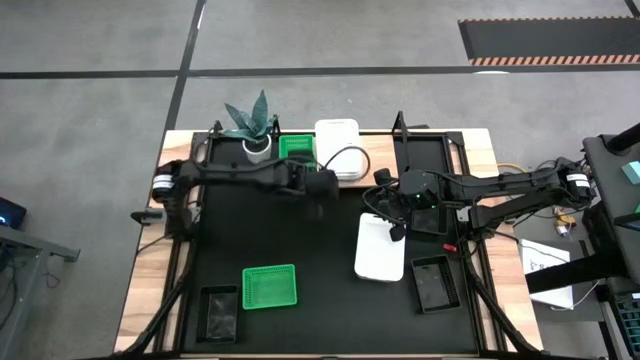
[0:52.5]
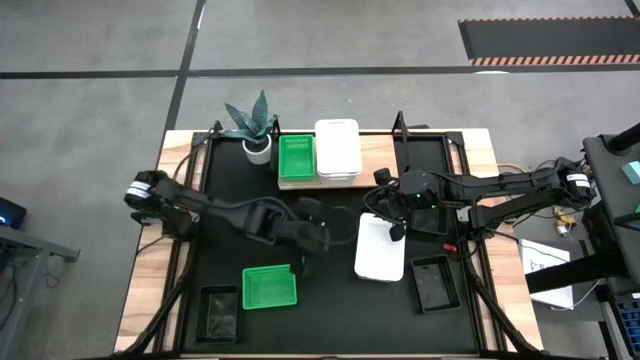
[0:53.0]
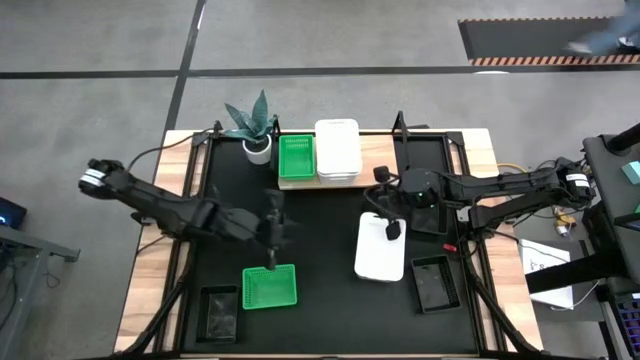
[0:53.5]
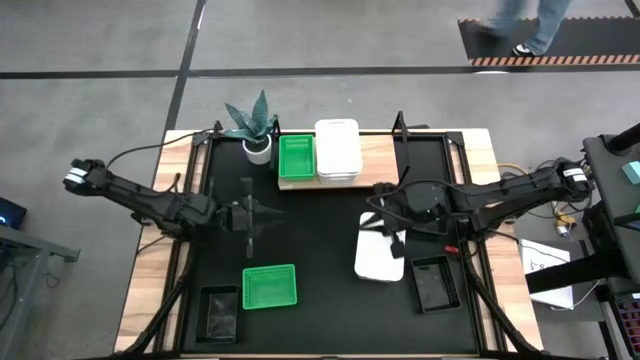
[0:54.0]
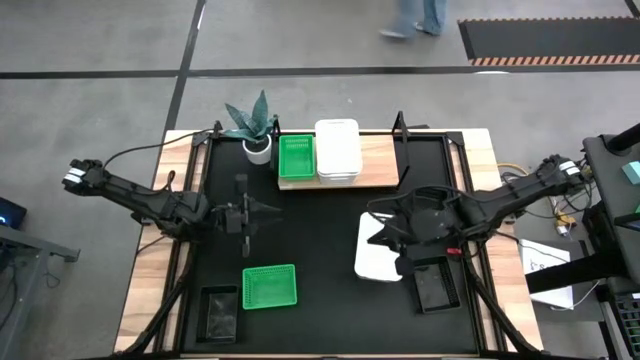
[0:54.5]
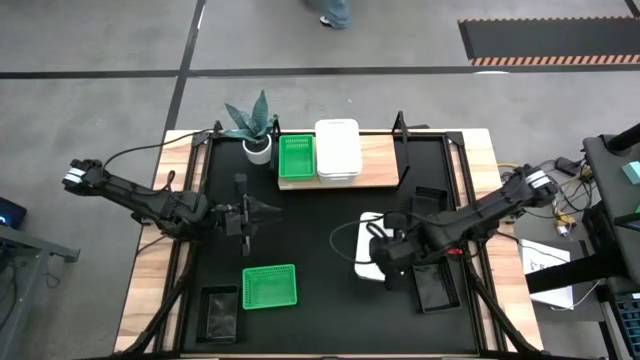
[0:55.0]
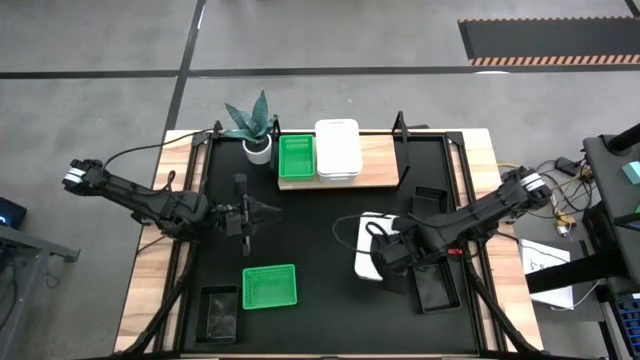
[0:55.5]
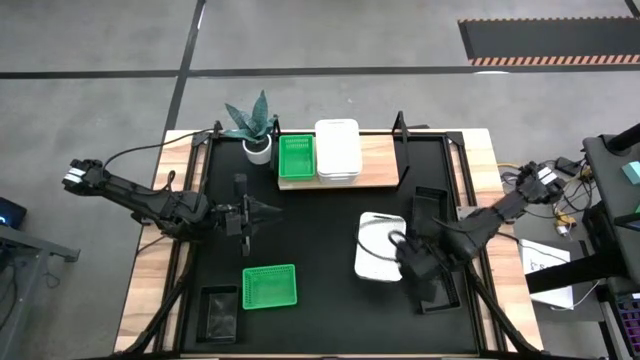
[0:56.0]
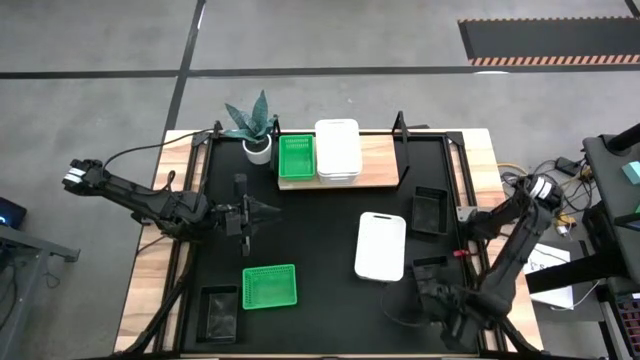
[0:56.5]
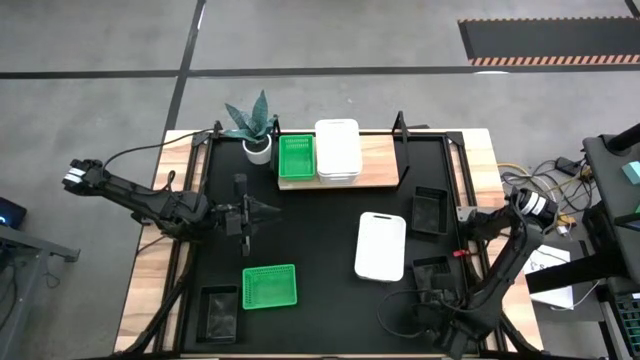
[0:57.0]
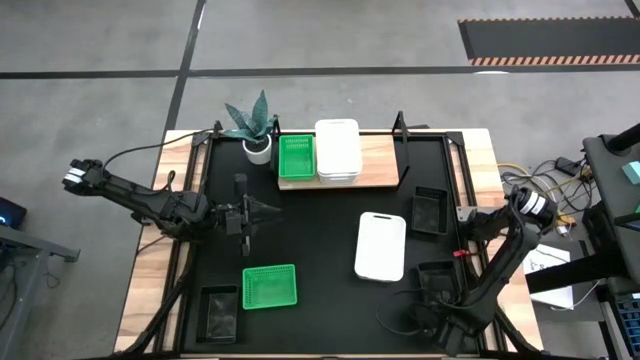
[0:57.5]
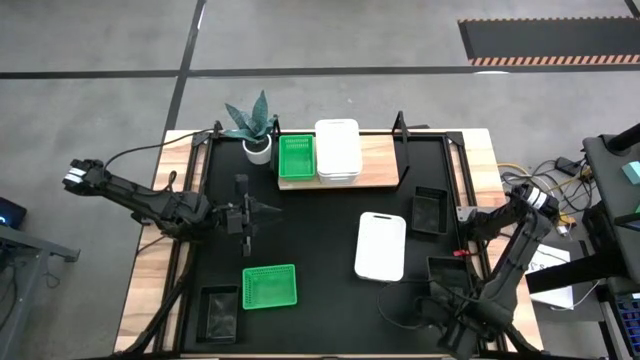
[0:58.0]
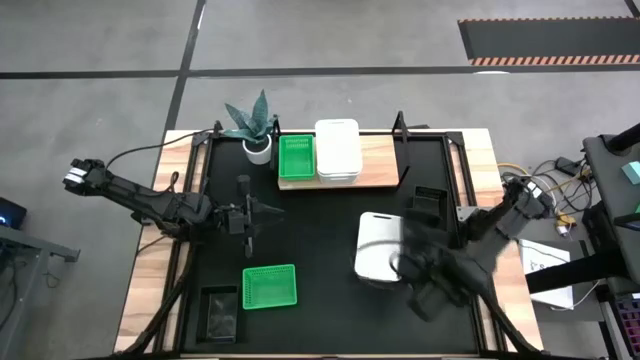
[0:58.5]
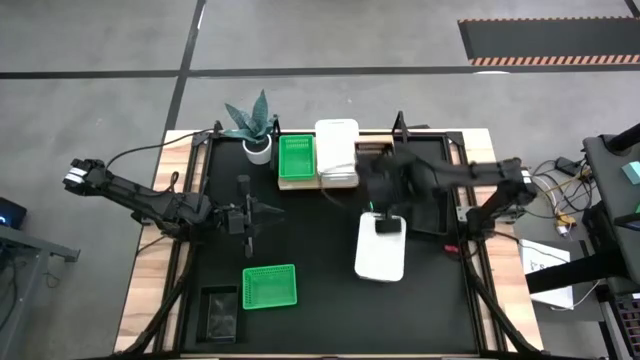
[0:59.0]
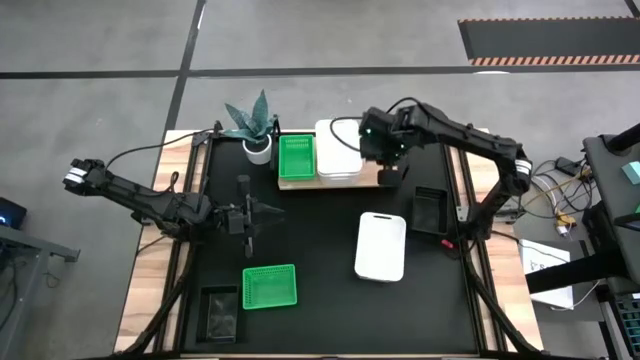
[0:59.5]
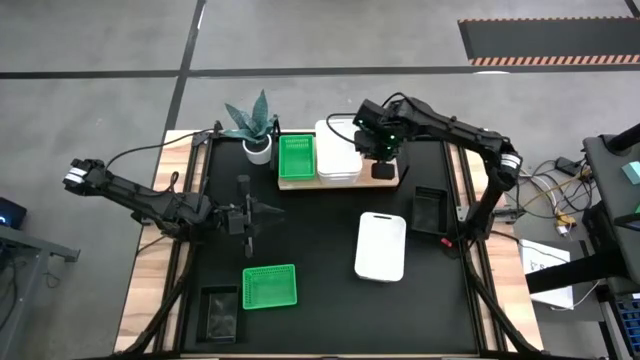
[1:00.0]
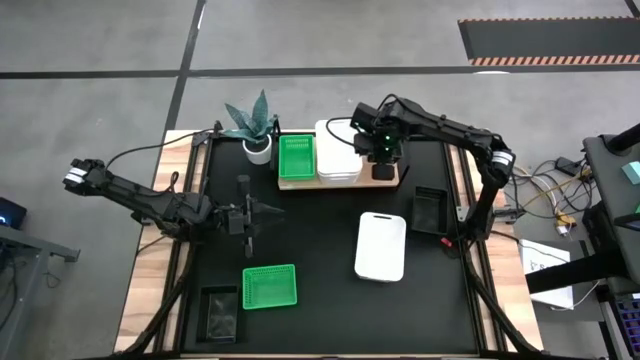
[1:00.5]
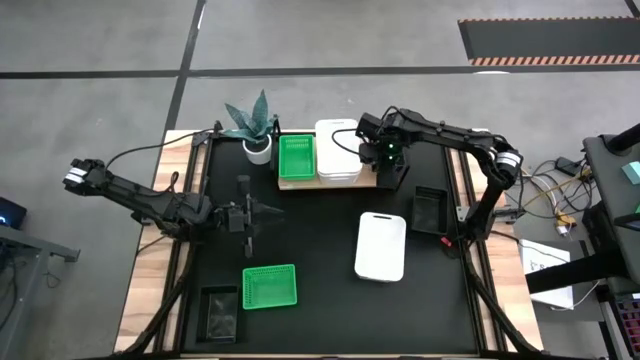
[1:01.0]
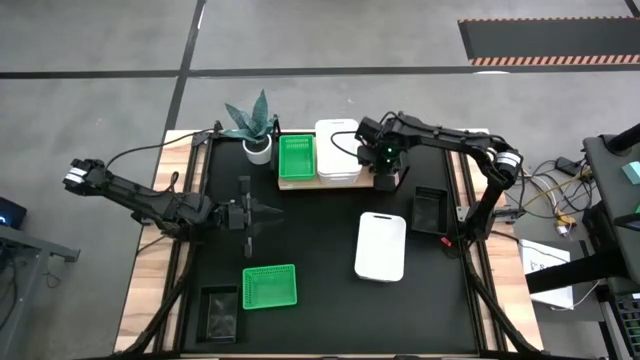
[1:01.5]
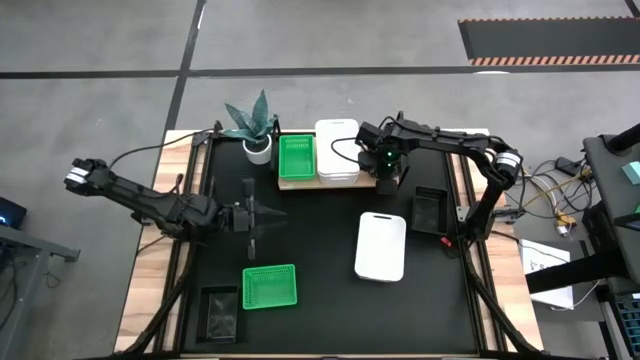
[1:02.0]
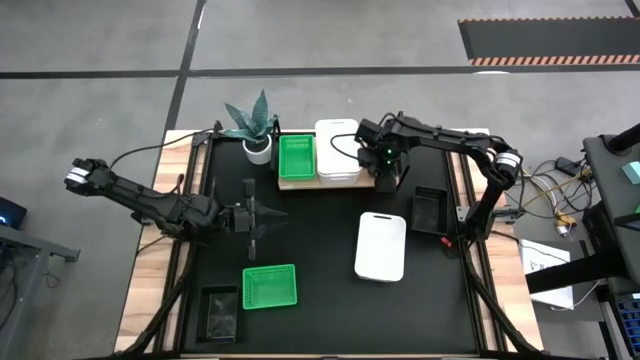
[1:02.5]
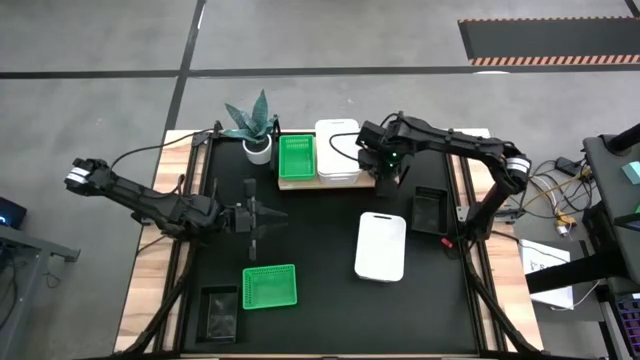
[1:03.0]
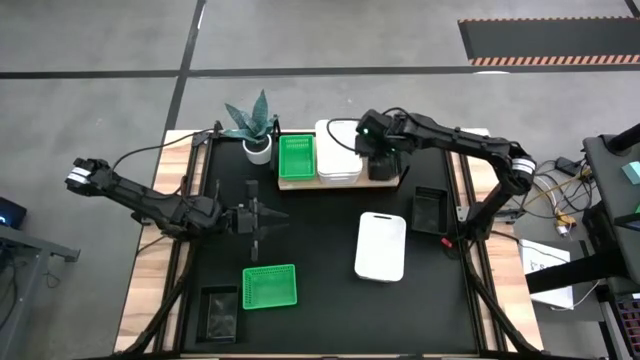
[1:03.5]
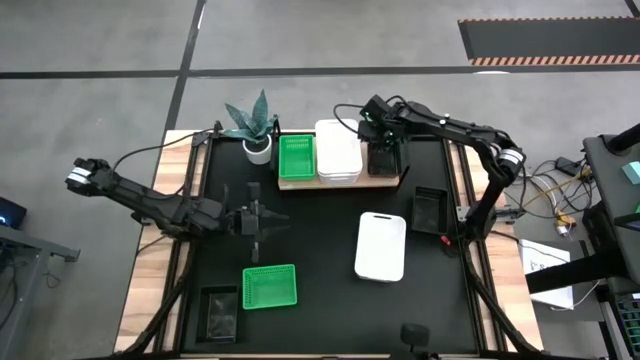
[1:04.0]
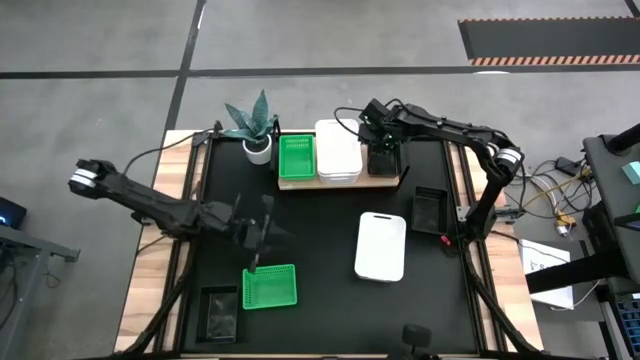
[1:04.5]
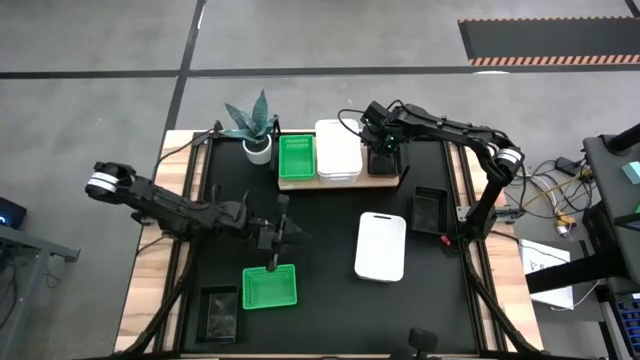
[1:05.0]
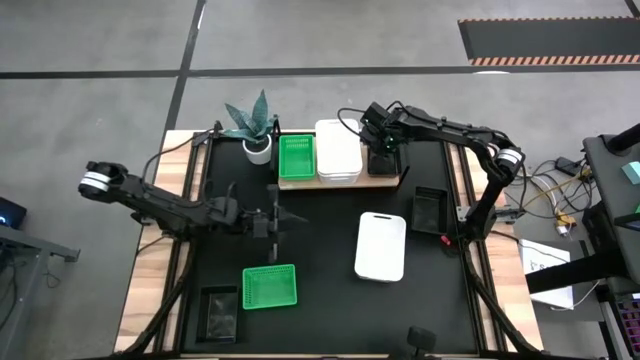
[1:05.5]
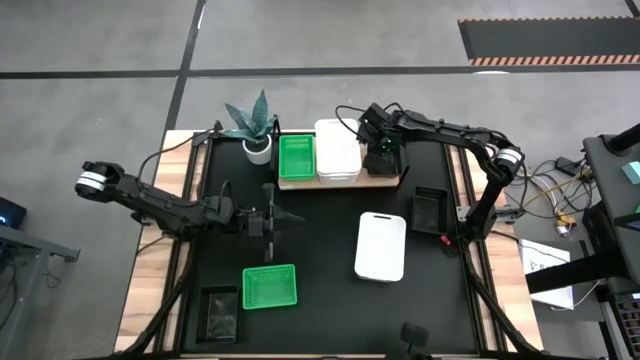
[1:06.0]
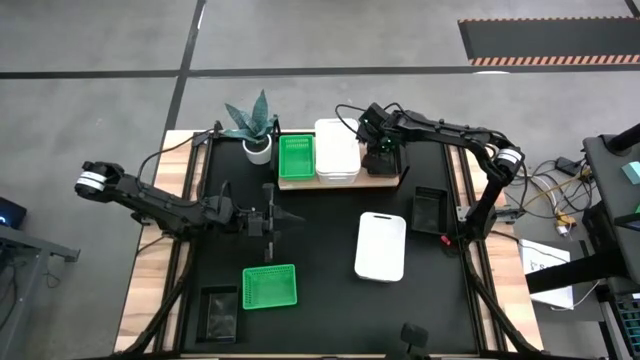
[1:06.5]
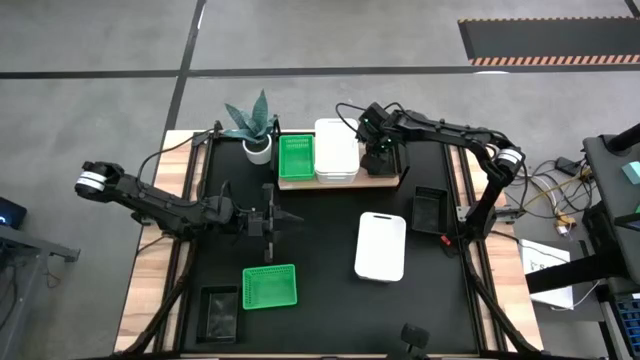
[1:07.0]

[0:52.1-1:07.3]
Task: Stack baskets on shelf by color
Put the bottom right black bin on the shelf

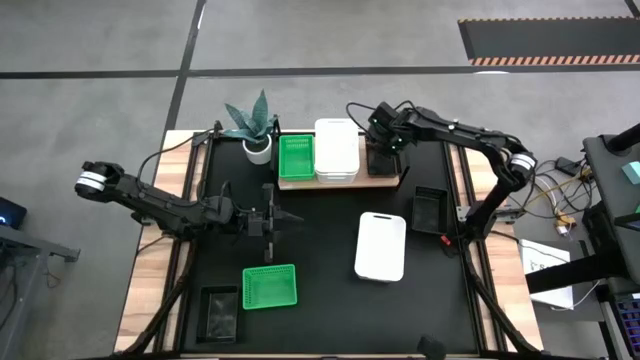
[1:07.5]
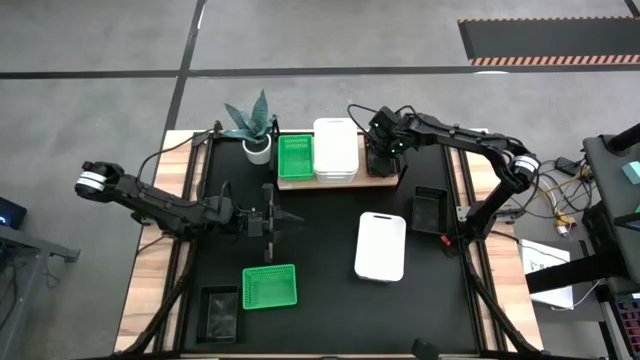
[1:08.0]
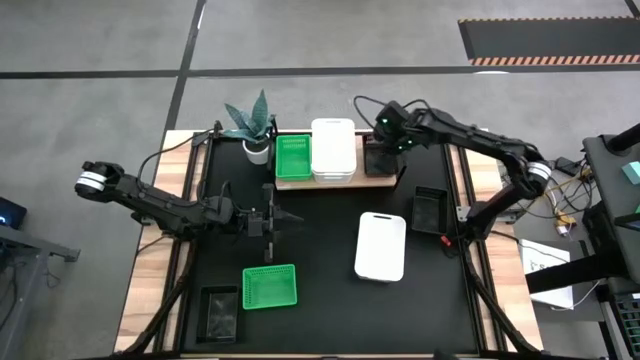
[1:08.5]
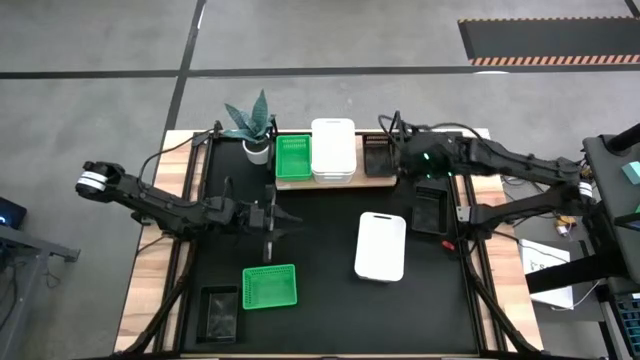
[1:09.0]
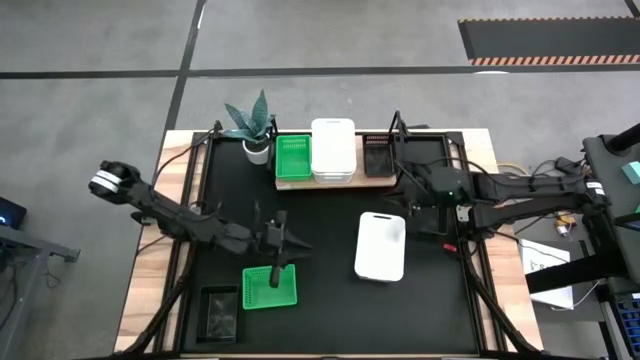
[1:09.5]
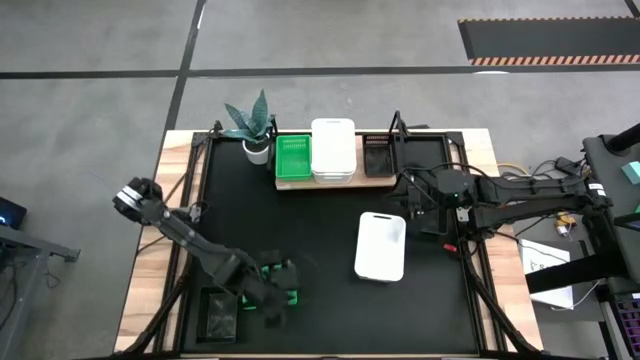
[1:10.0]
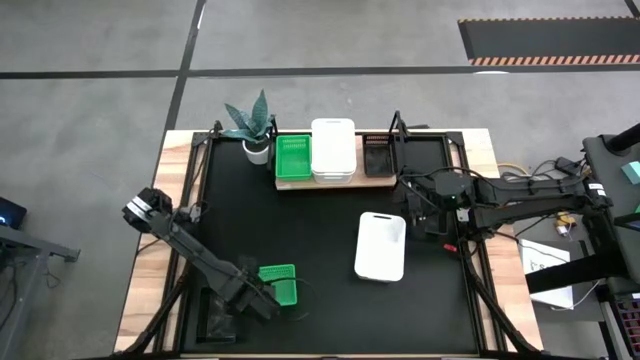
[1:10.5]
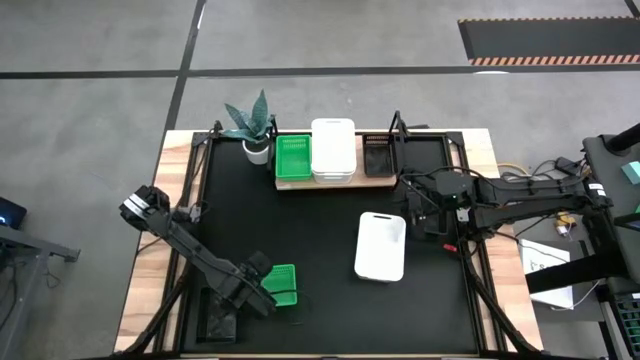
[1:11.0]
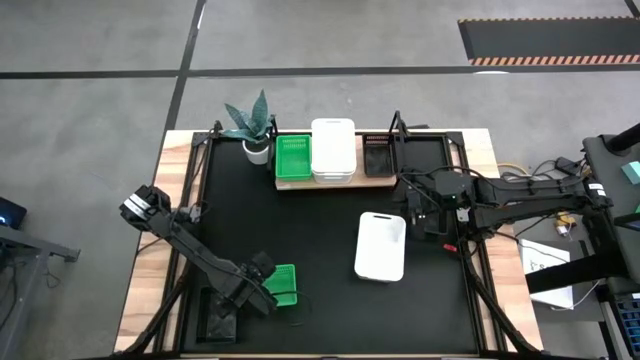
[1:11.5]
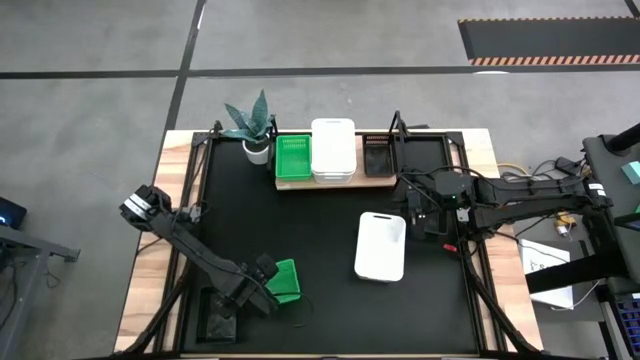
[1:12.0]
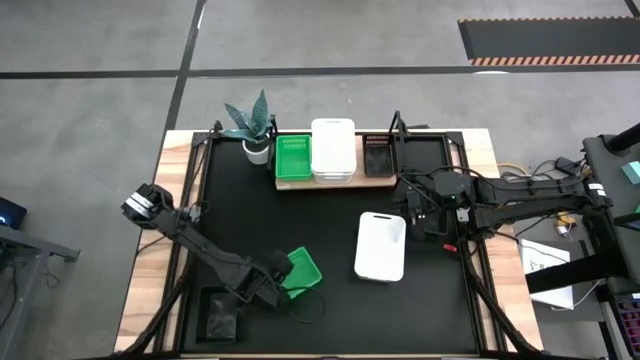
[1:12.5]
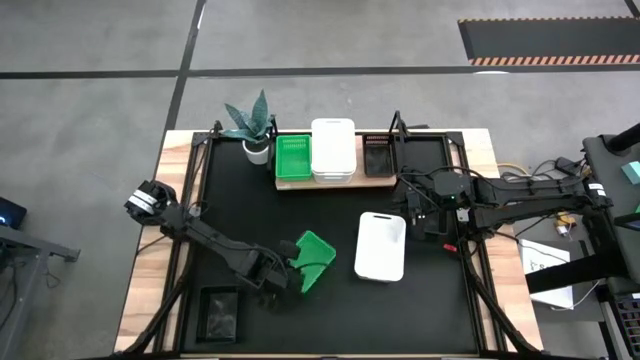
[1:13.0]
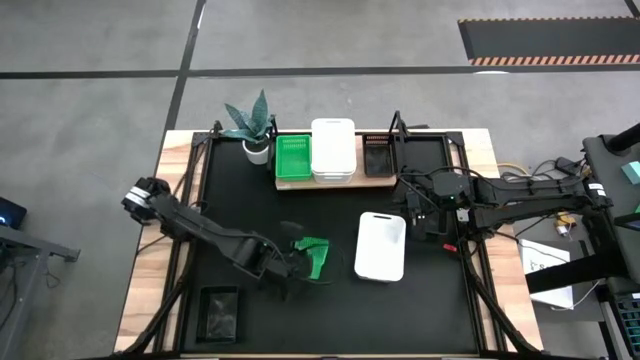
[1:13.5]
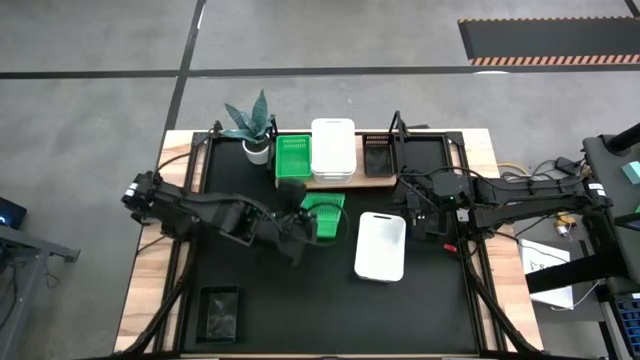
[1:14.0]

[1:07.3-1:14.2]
Stack the green bin into the green bins on the shelf
